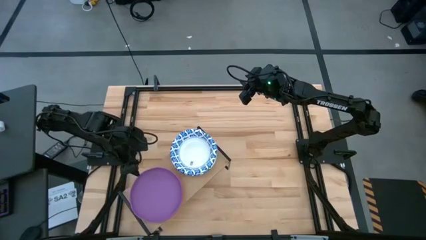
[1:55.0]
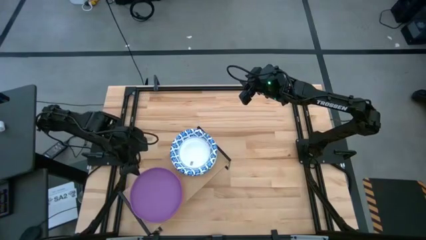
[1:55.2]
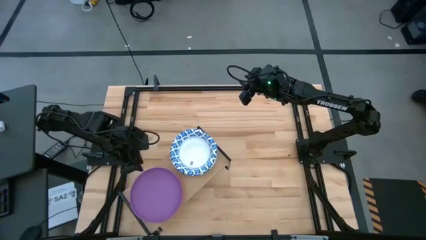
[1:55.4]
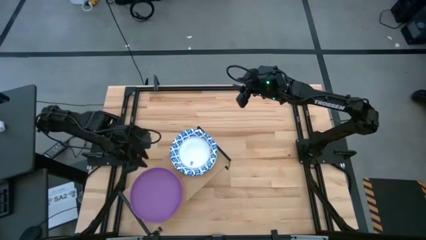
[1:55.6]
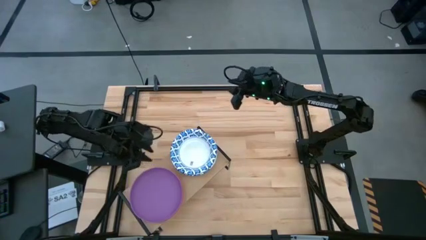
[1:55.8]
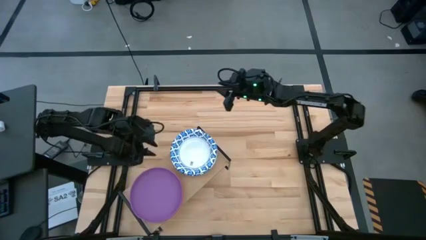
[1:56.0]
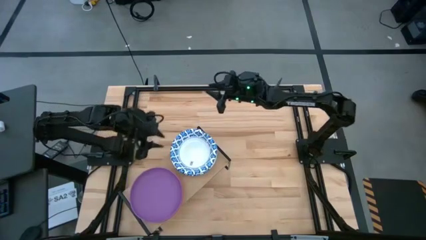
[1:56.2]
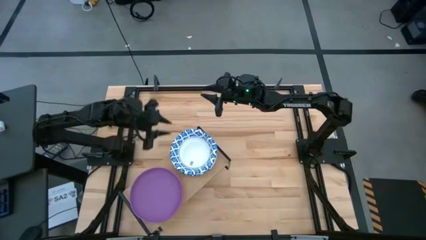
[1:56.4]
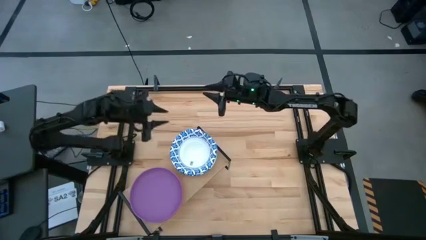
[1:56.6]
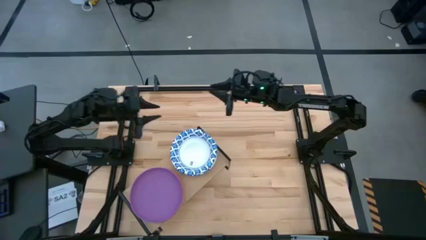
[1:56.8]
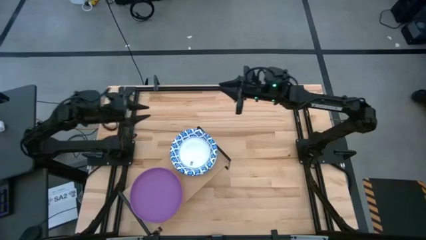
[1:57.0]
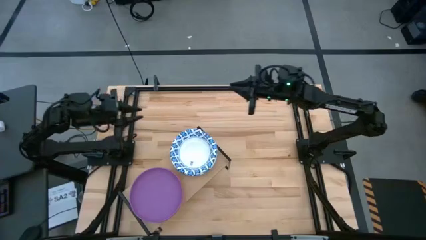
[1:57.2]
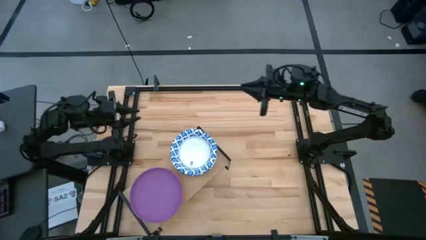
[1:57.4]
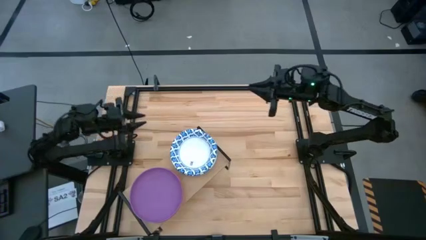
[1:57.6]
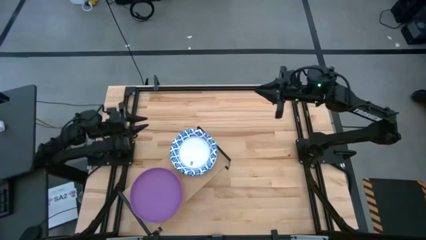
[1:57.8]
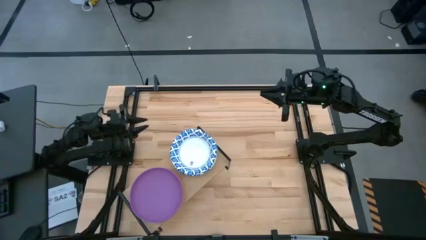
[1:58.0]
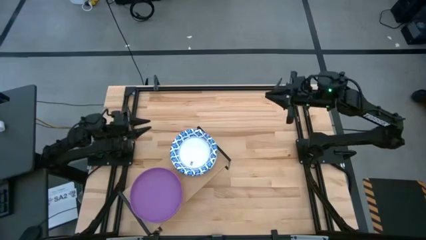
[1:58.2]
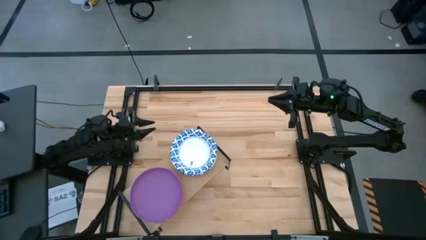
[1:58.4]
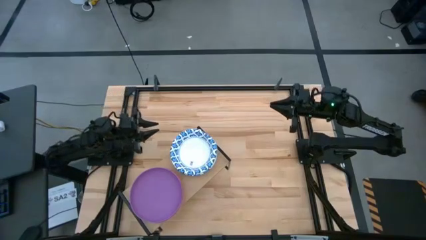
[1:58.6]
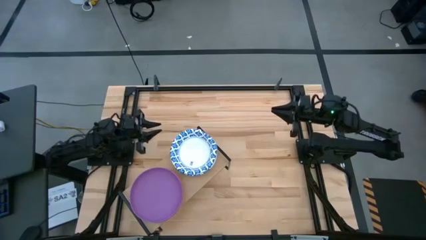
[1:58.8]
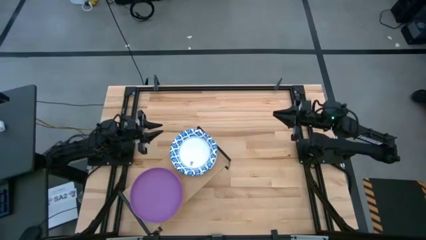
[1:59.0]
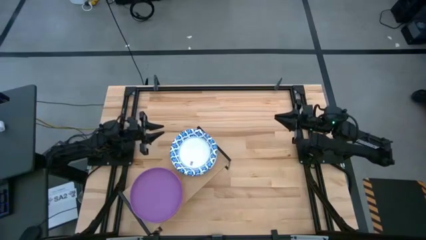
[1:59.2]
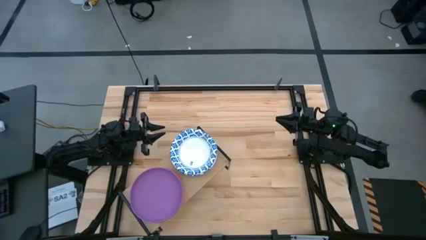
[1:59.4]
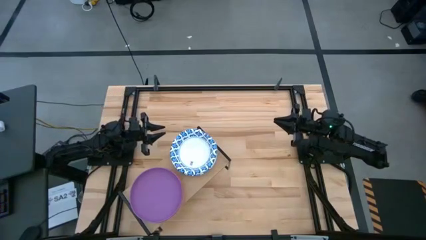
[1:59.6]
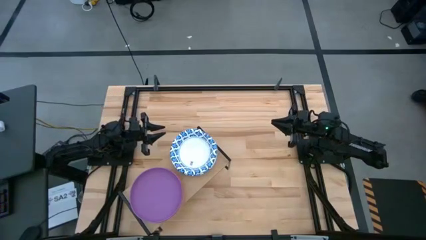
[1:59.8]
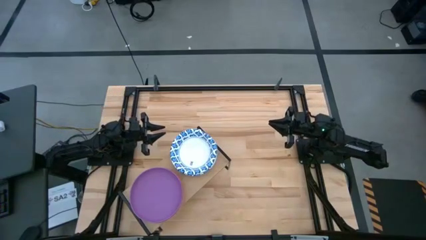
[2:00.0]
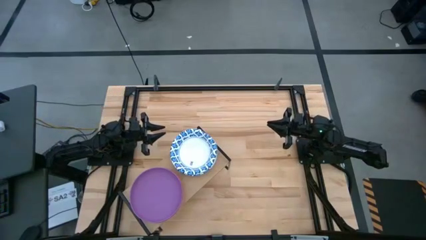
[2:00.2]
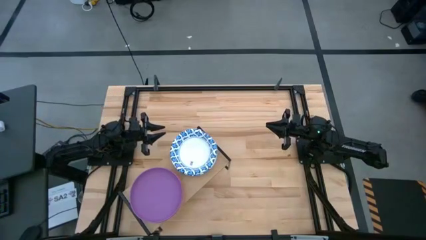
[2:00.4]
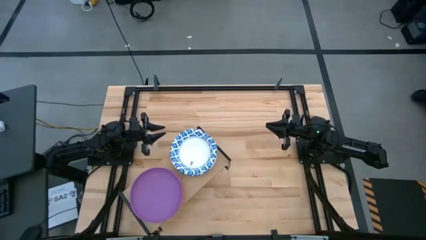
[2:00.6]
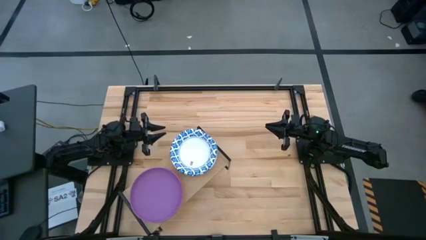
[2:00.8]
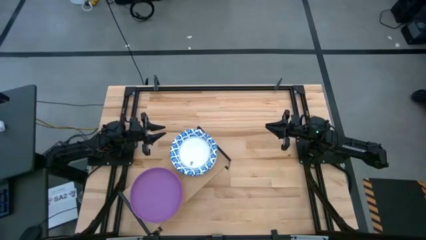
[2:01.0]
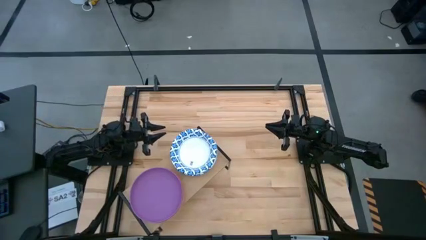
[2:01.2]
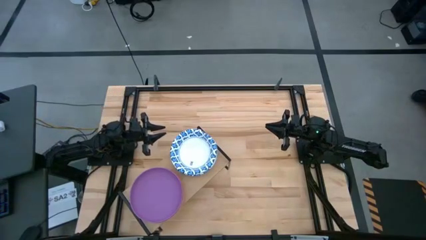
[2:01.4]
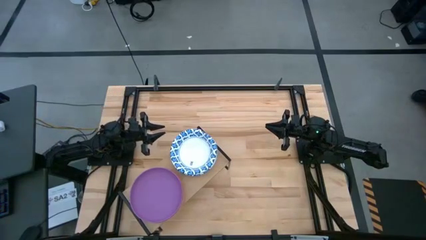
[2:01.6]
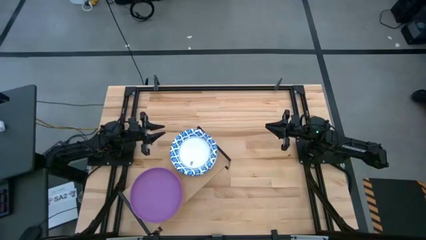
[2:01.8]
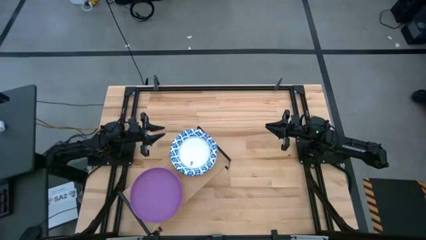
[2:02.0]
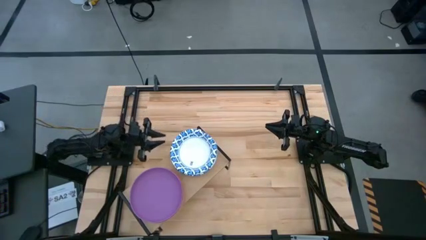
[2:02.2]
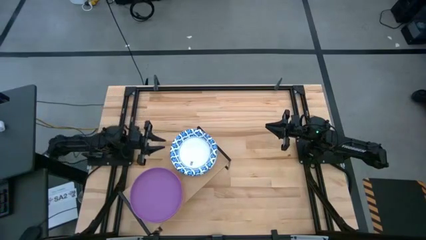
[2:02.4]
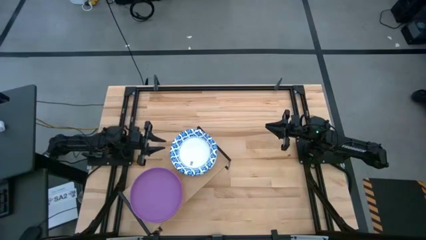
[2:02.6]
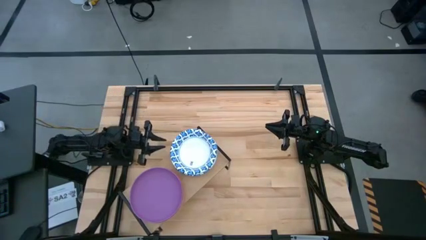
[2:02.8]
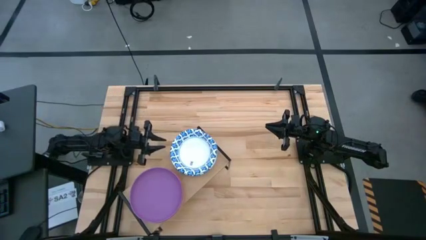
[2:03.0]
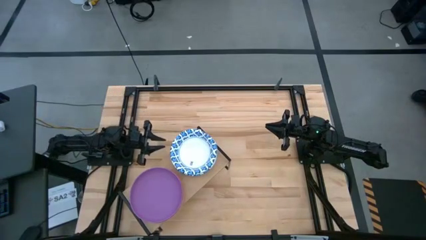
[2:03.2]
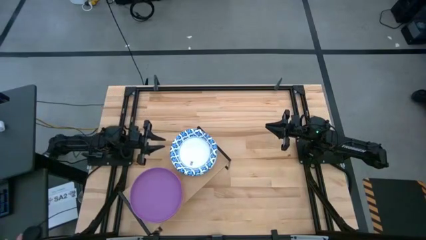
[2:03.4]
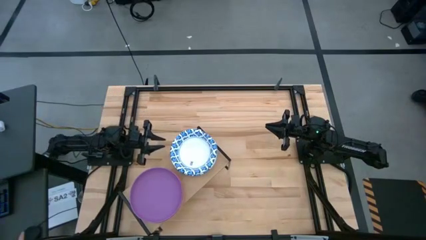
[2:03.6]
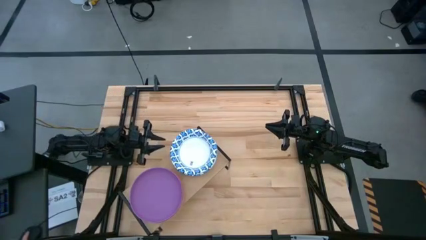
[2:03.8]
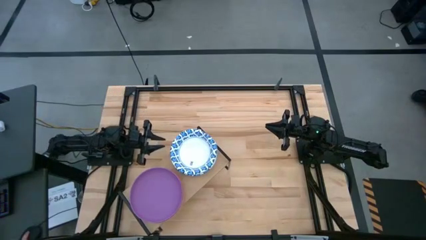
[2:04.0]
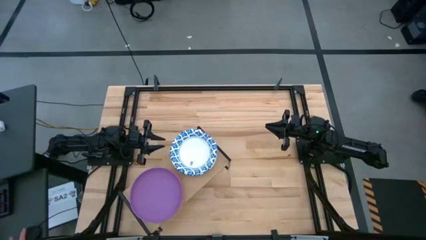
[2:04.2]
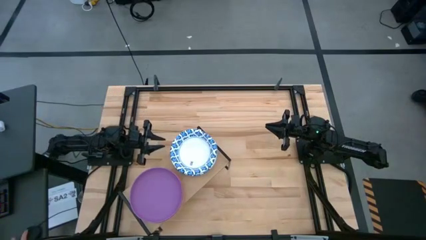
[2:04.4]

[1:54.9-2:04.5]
Task: Place and stack plates onto a shelf
Return to Home Position

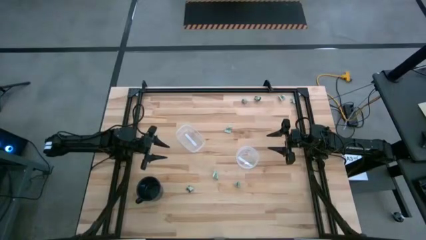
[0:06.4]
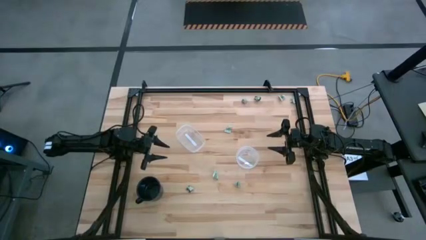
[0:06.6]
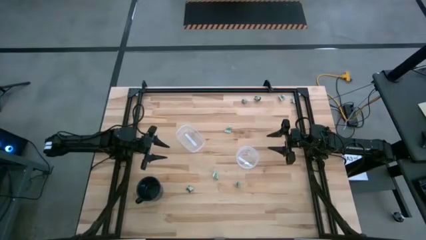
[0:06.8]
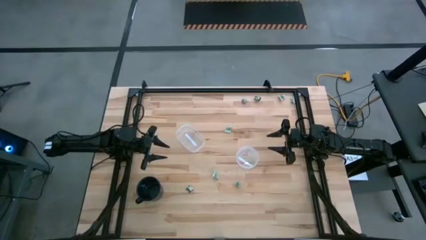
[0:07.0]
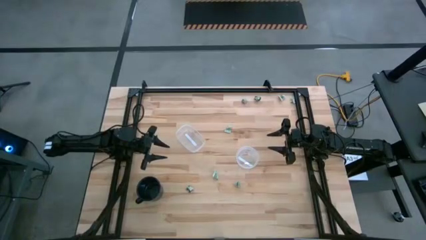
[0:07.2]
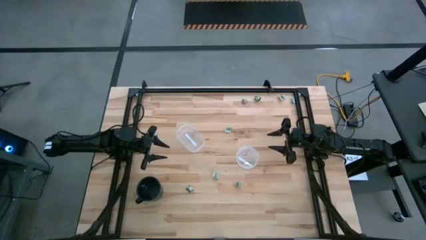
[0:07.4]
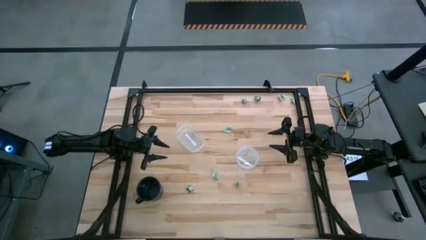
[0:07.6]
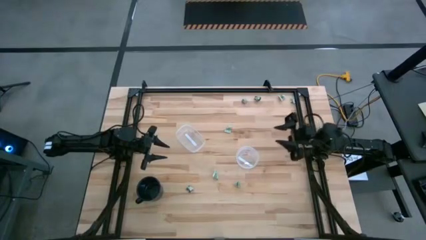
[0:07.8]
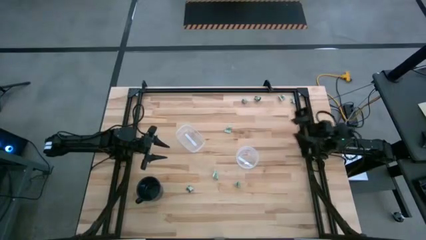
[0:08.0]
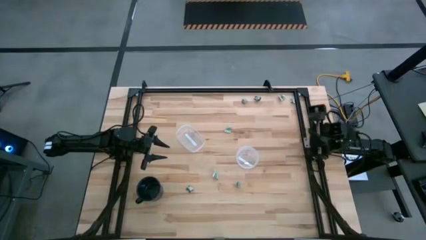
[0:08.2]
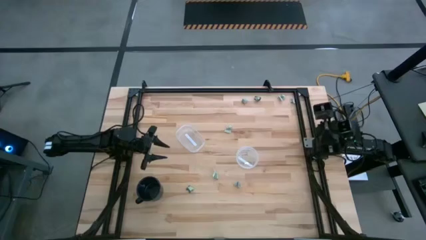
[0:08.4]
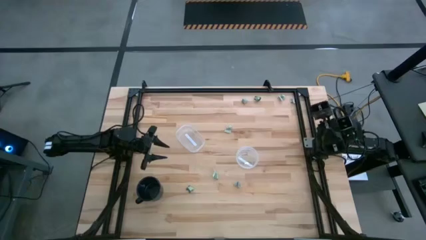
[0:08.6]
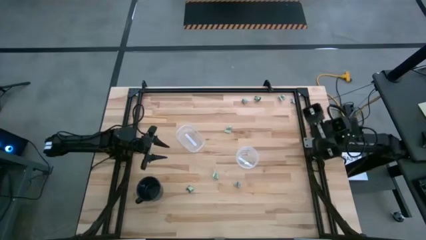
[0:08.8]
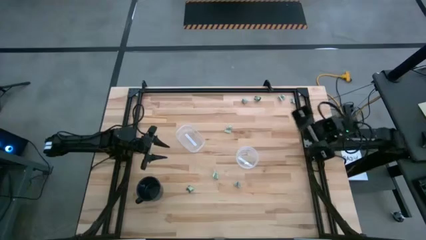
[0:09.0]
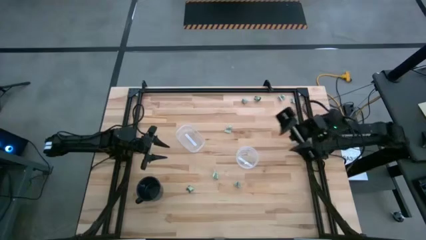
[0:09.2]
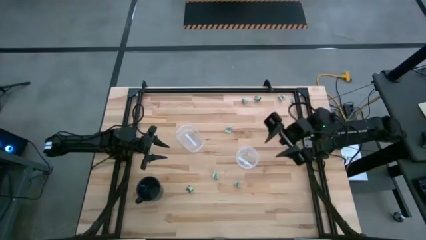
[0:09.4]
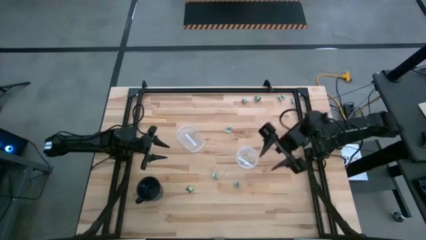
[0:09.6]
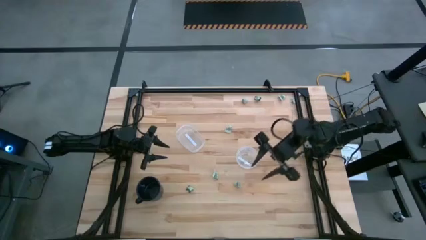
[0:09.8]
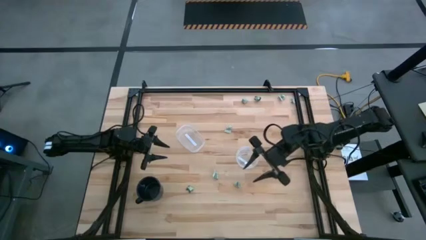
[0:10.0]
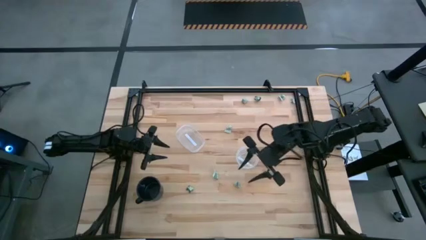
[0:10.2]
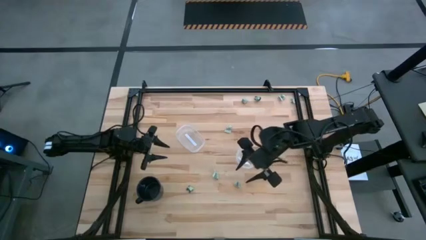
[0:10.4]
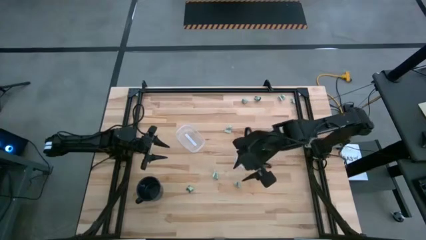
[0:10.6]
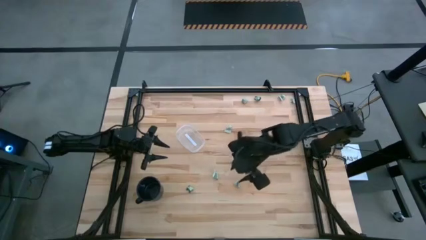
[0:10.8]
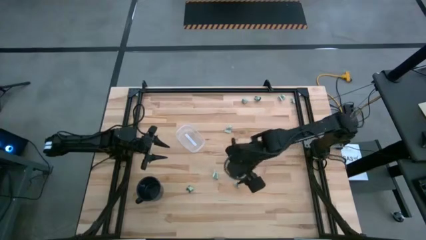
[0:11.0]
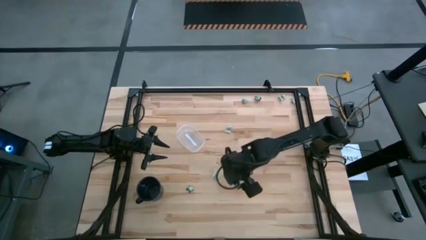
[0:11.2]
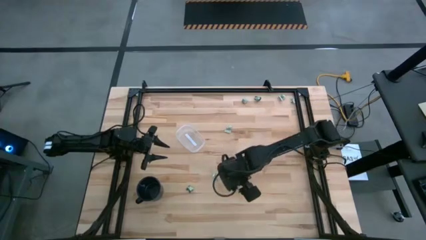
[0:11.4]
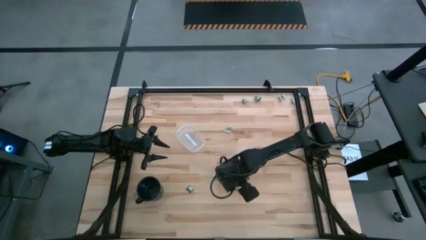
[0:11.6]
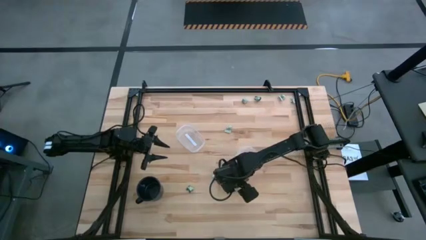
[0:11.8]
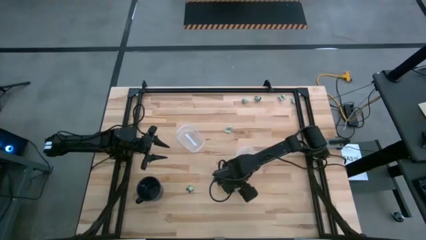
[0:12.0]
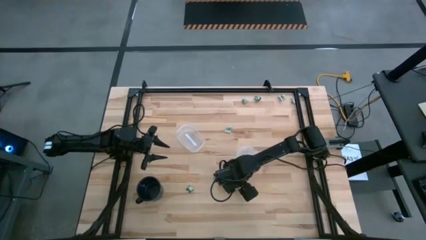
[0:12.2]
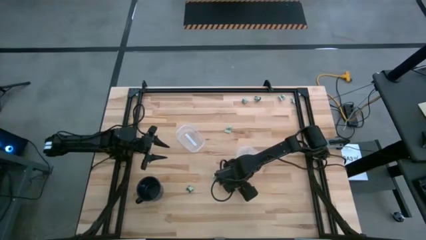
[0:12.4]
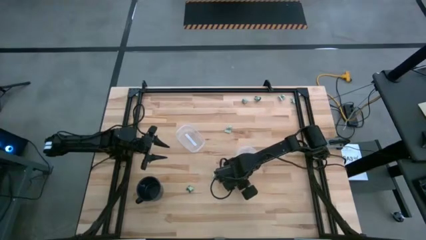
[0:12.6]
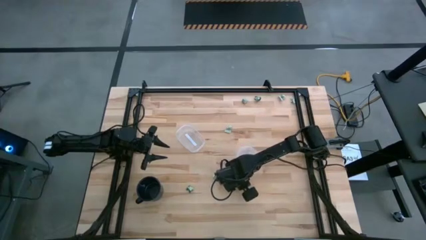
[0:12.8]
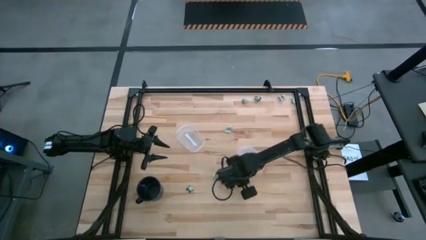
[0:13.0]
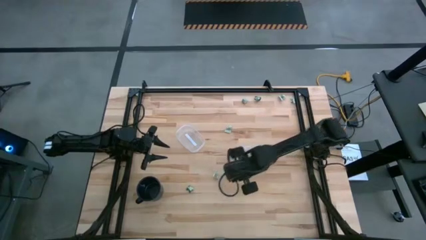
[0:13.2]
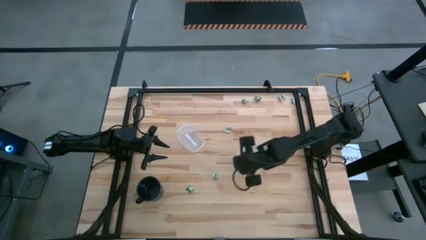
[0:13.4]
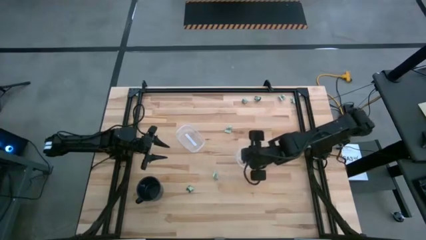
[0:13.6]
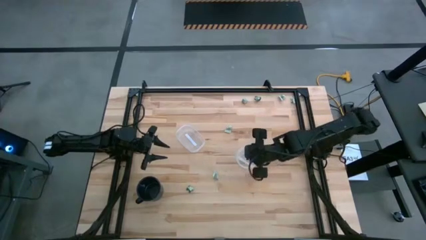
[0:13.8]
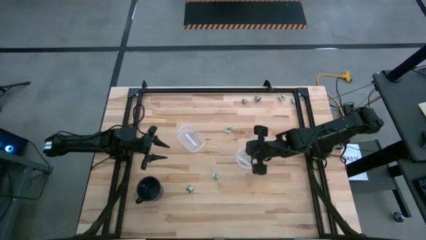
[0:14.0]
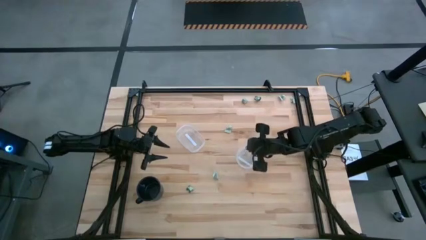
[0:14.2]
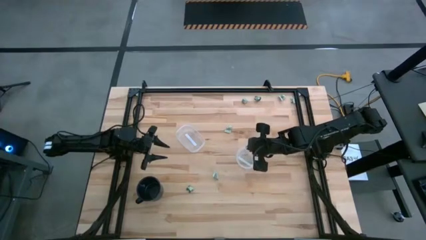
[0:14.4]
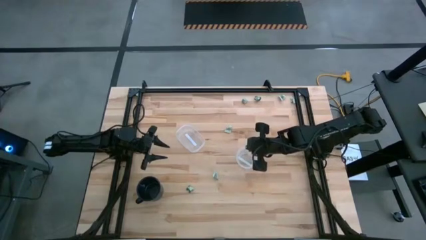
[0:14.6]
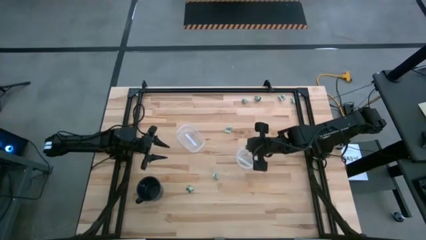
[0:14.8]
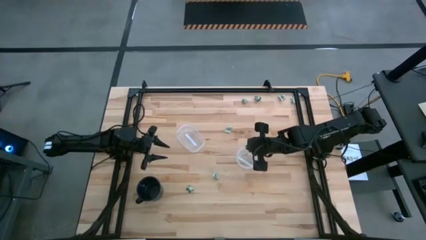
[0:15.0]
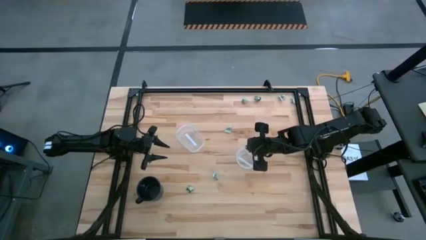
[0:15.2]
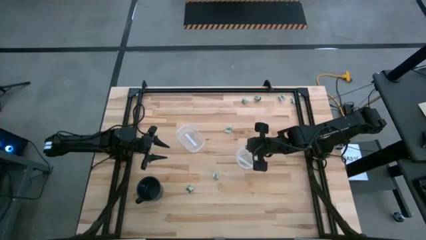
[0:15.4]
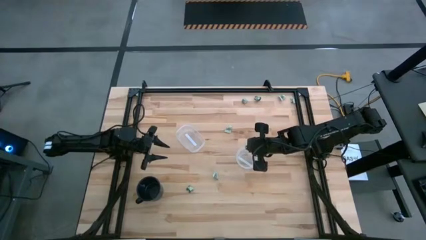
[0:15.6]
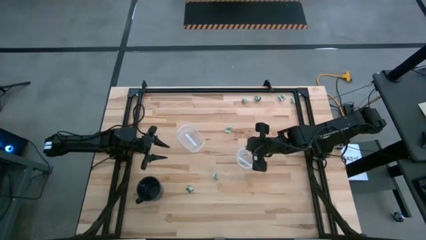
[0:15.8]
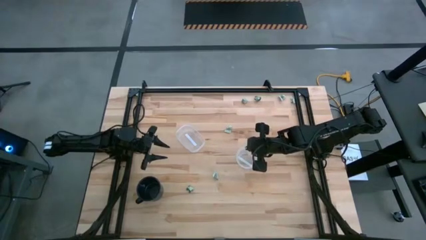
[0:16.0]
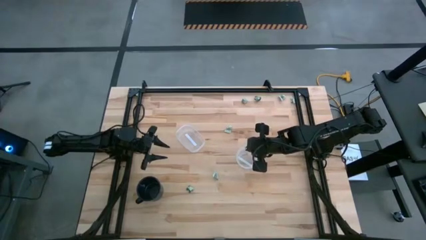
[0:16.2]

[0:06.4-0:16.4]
Task: Pick and place Stevia / Truvia into bins
Put the white stevia packet into the right transparent container
